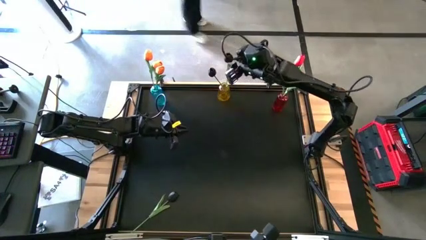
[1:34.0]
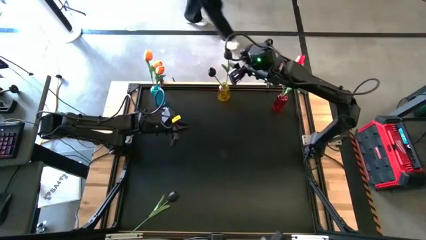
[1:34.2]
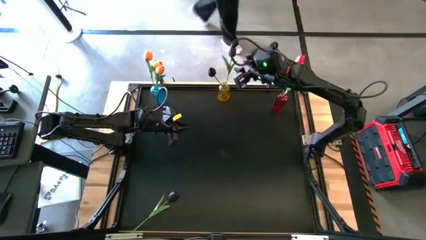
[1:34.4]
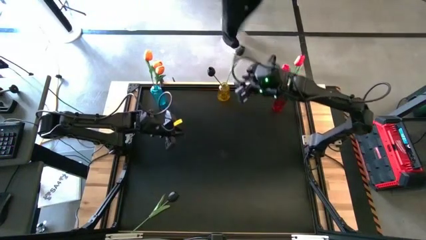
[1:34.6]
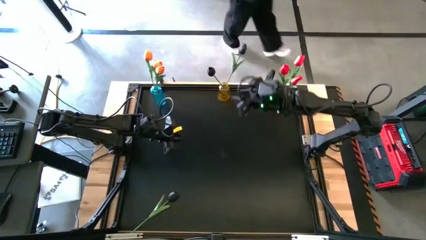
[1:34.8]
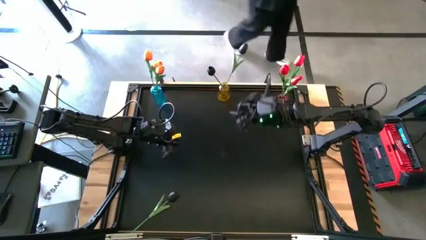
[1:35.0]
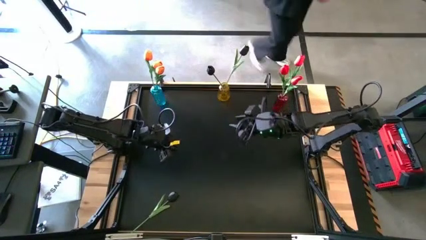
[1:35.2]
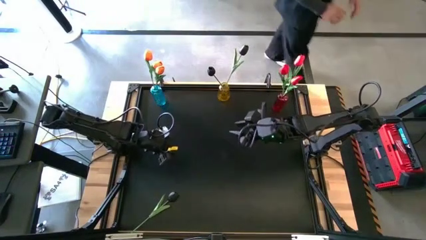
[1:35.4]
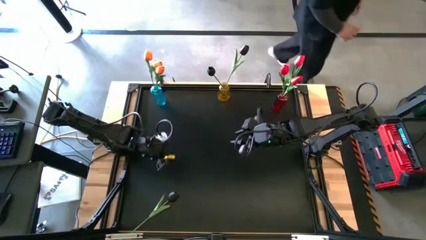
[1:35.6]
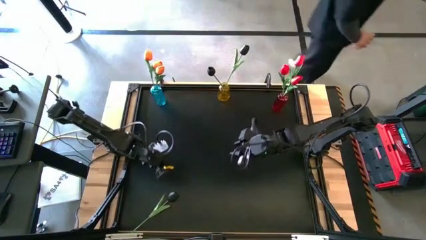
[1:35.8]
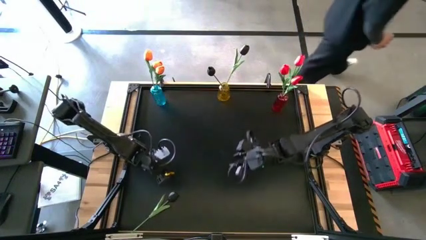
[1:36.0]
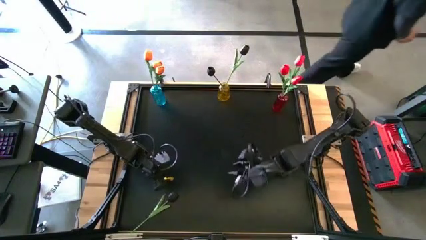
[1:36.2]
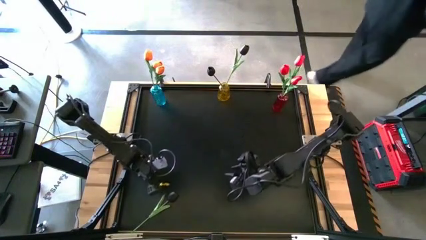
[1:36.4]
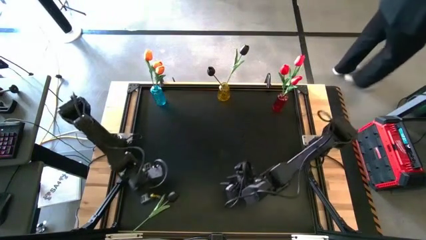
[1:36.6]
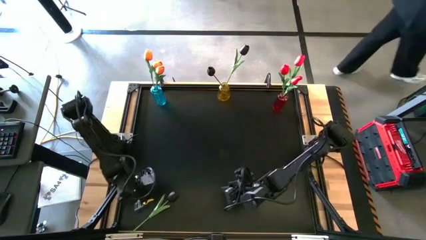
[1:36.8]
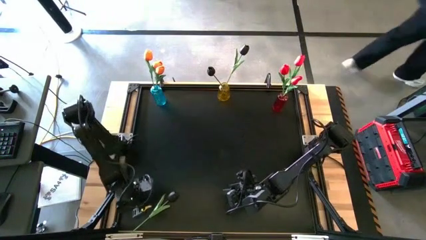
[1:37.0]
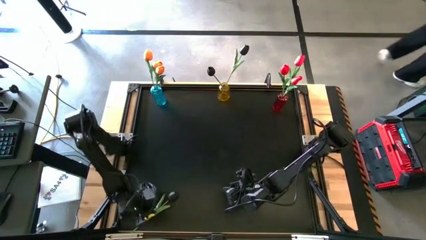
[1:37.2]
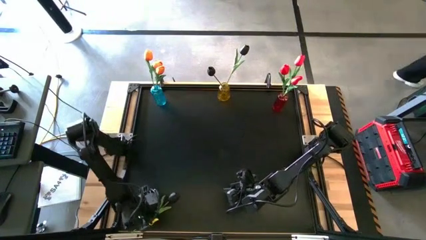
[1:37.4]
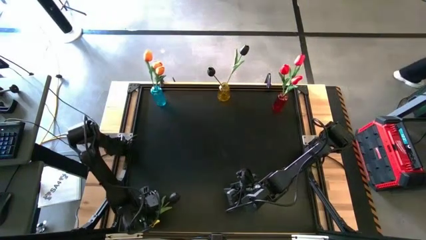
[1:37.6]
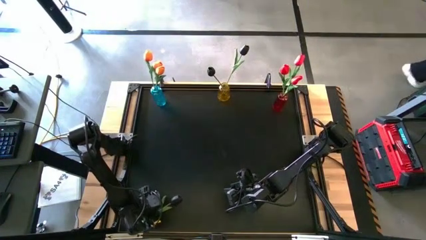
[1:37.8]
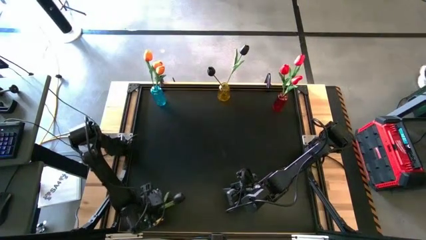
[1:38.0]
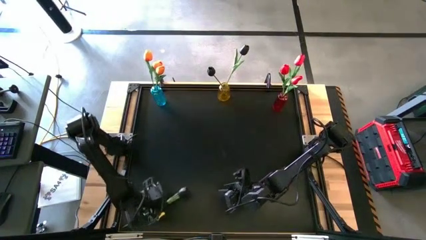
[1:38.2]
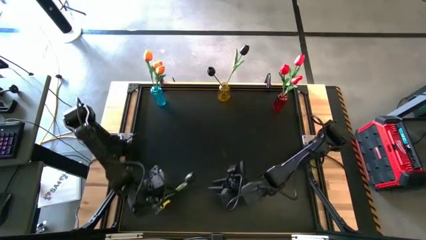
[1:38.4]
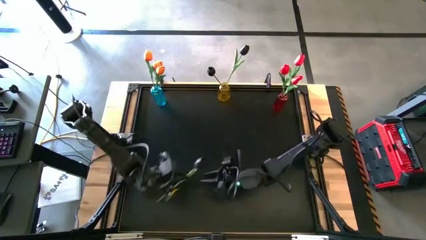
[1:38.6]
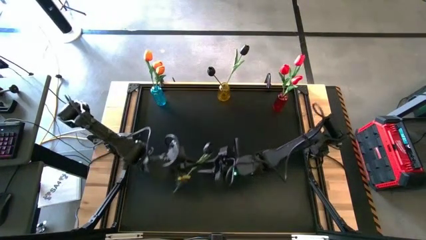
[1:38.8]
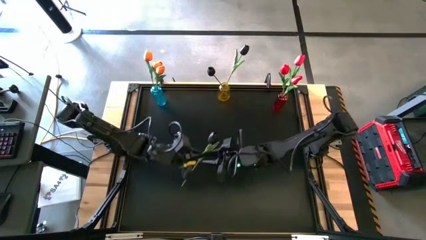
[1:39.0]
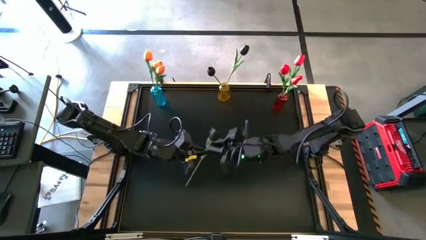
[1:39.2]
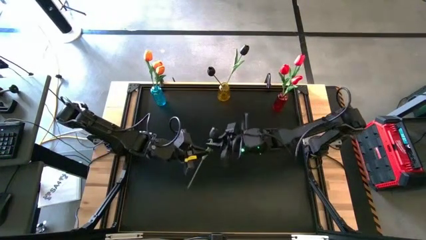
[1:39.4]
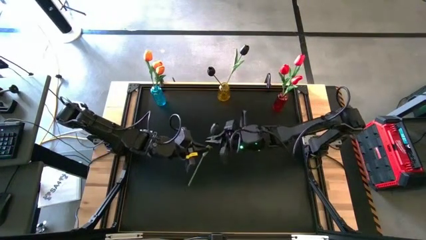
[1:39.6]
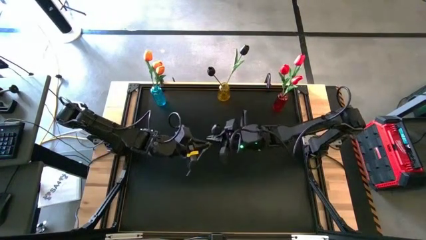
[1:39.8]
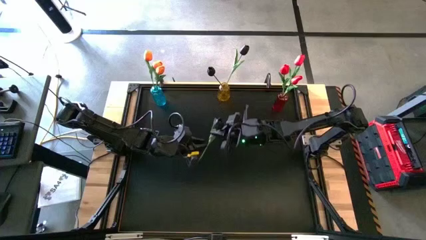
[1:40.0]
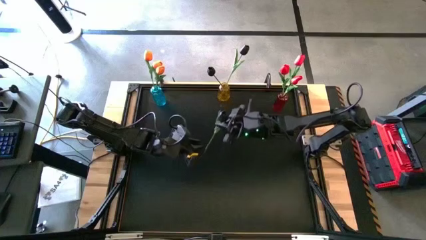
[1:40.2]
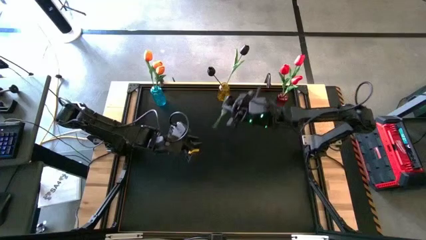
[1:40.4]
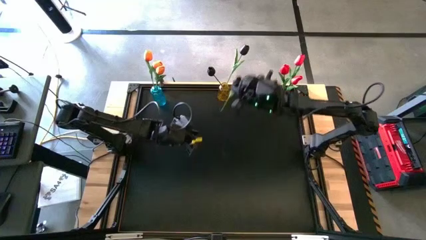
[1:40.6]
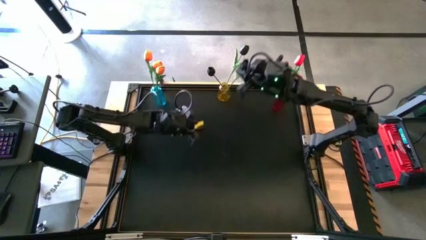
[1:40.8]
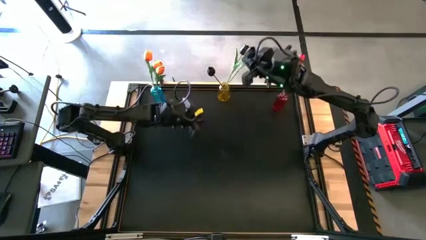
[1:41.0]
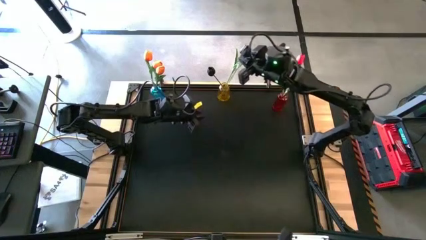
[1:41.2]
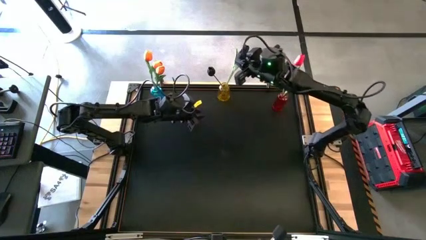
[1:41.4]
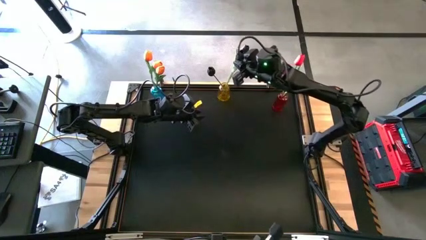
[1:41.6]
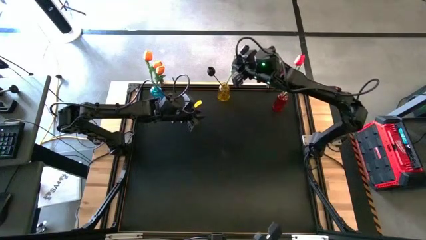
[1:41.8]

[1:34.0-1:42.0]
Task: Sort flowers into vase by color
Put the black flower into the yellow vase

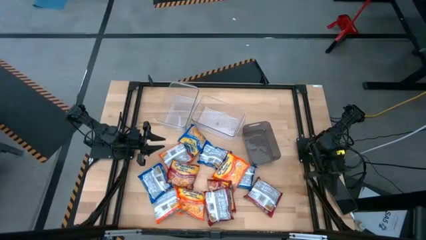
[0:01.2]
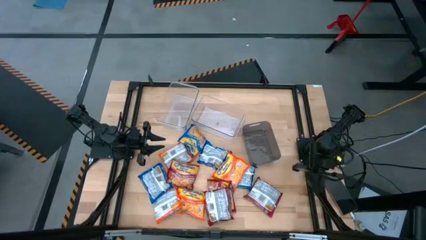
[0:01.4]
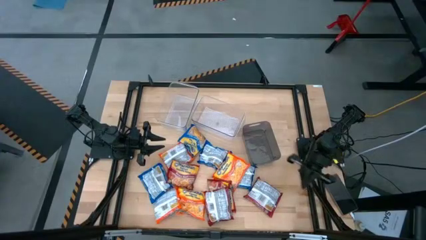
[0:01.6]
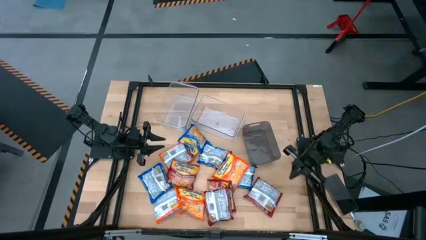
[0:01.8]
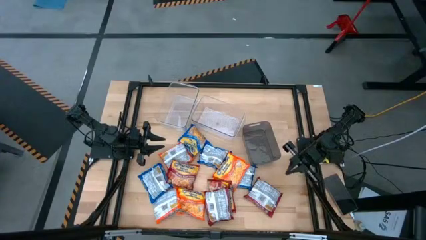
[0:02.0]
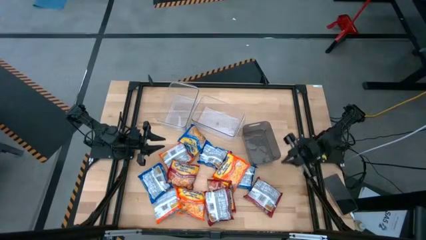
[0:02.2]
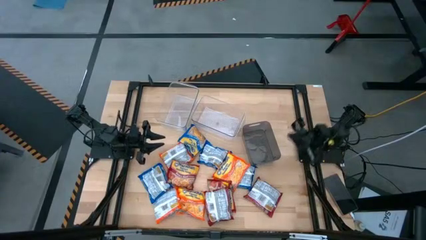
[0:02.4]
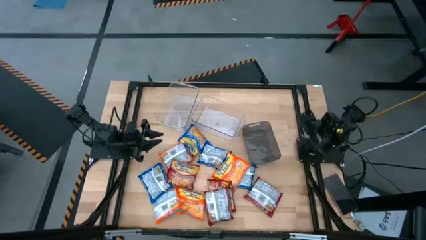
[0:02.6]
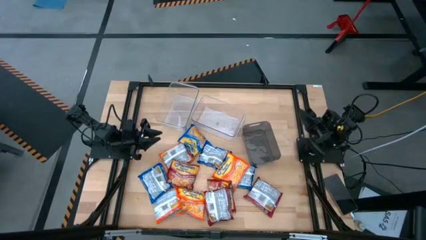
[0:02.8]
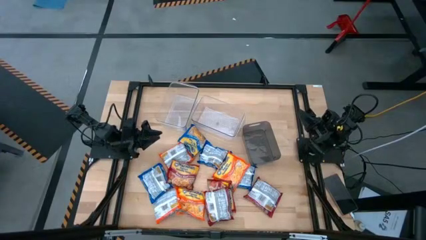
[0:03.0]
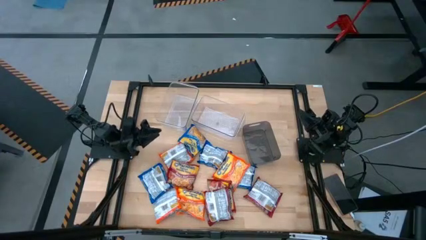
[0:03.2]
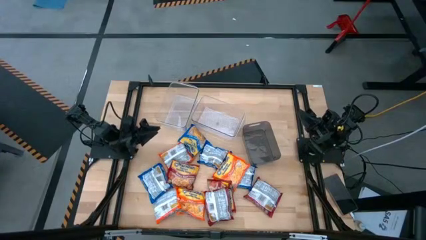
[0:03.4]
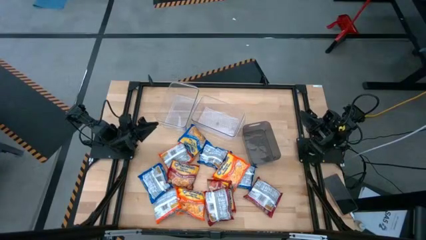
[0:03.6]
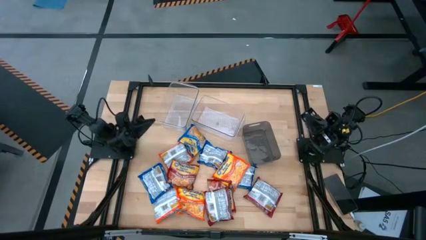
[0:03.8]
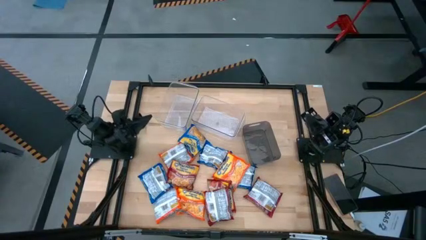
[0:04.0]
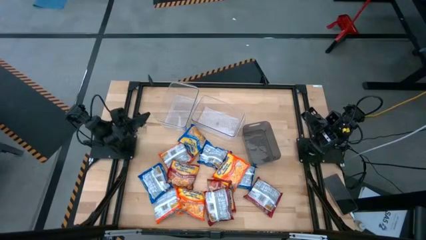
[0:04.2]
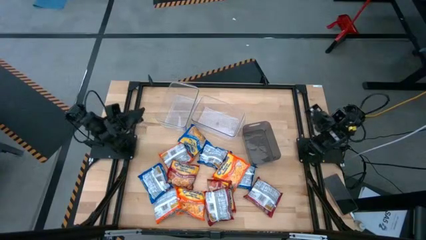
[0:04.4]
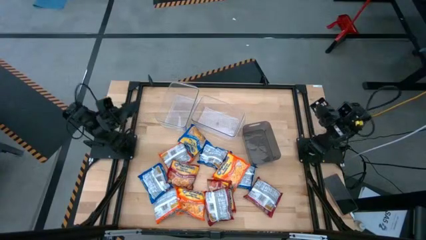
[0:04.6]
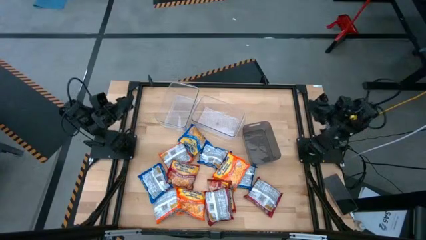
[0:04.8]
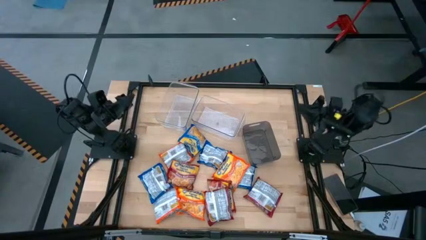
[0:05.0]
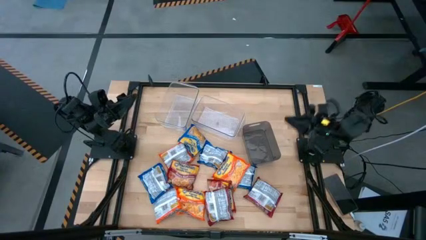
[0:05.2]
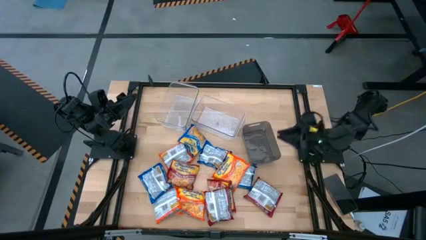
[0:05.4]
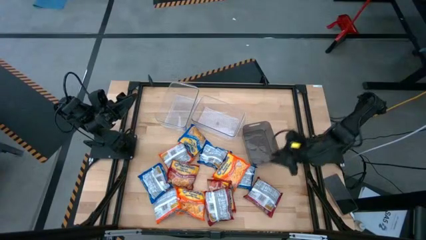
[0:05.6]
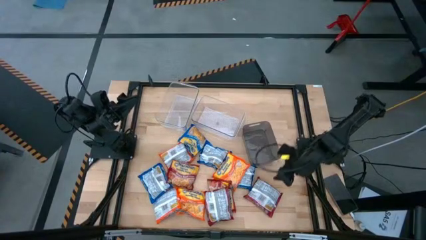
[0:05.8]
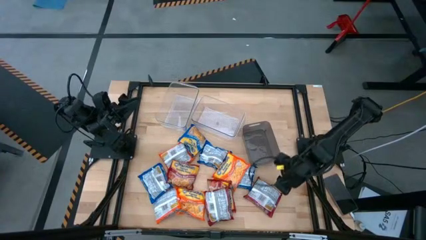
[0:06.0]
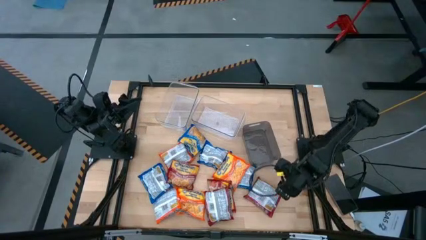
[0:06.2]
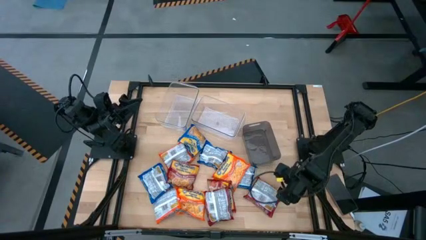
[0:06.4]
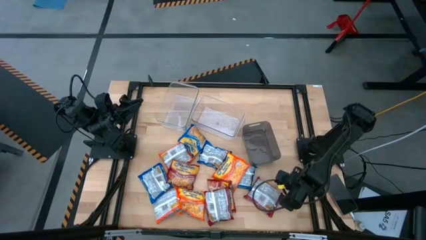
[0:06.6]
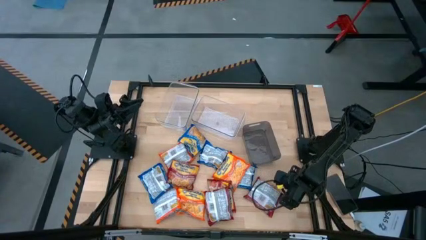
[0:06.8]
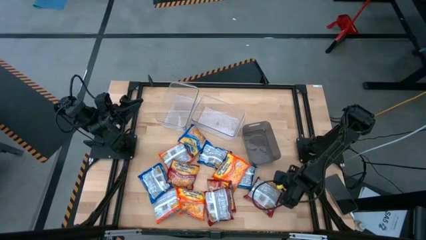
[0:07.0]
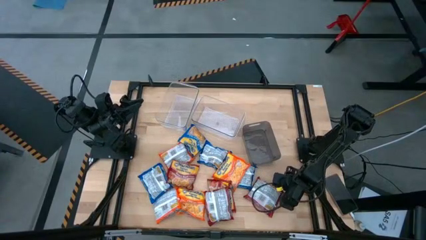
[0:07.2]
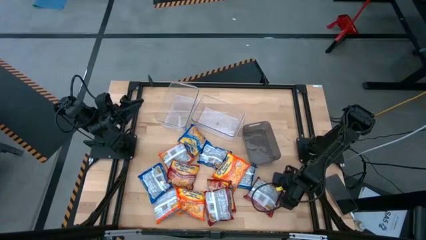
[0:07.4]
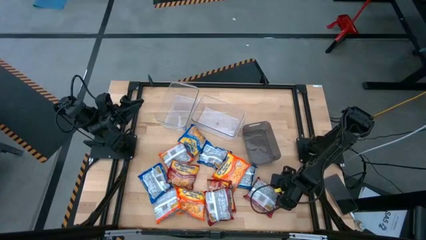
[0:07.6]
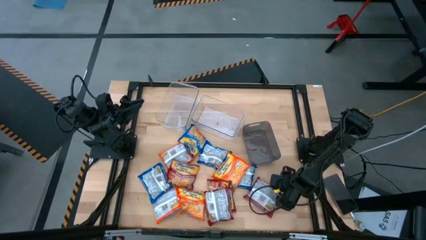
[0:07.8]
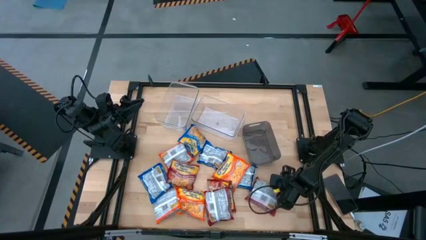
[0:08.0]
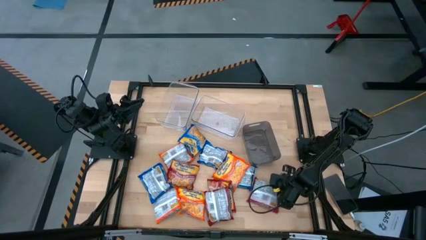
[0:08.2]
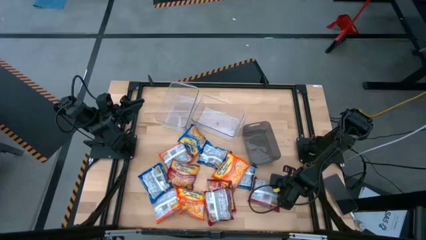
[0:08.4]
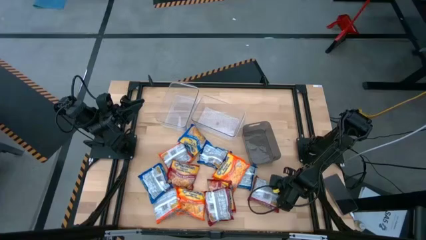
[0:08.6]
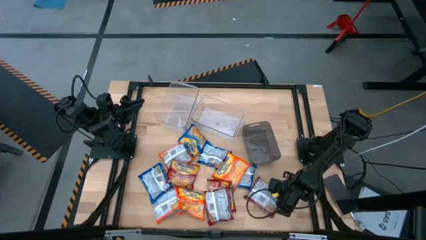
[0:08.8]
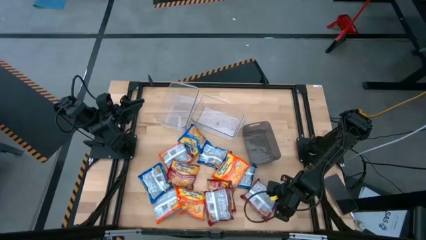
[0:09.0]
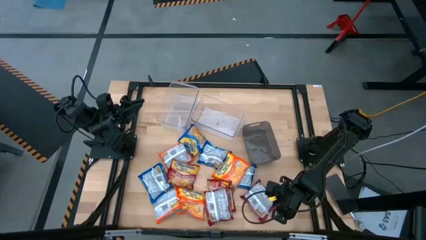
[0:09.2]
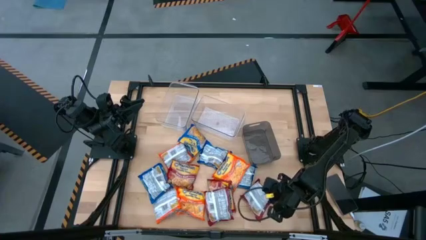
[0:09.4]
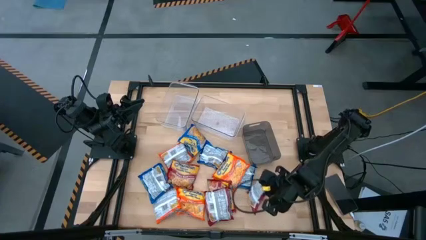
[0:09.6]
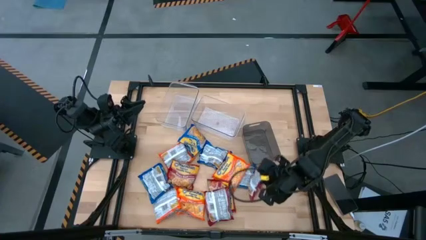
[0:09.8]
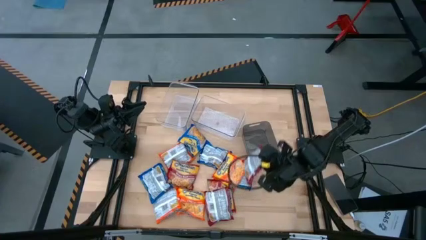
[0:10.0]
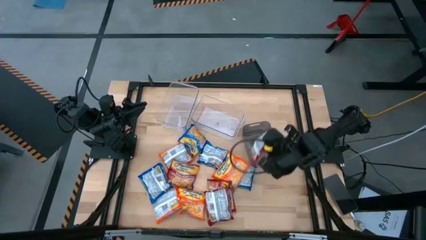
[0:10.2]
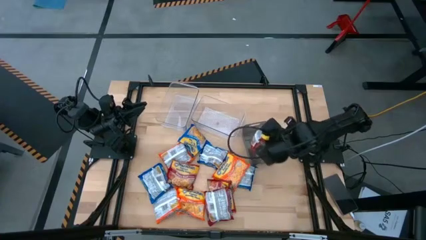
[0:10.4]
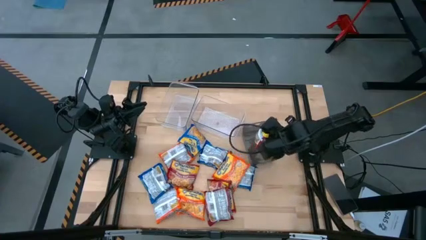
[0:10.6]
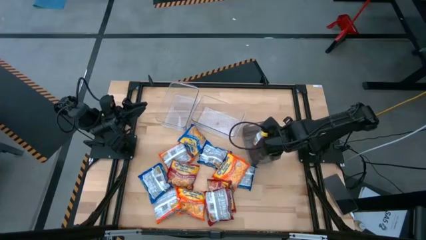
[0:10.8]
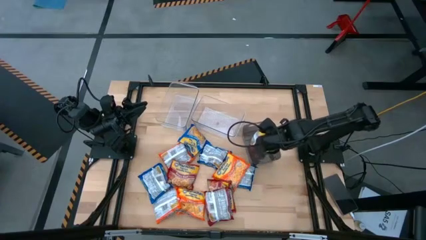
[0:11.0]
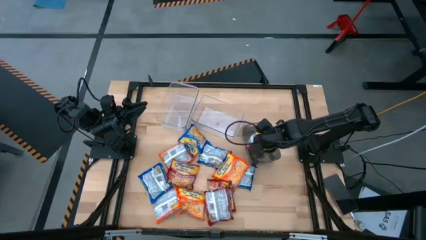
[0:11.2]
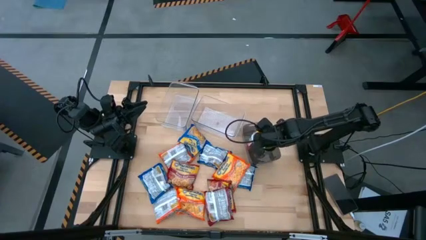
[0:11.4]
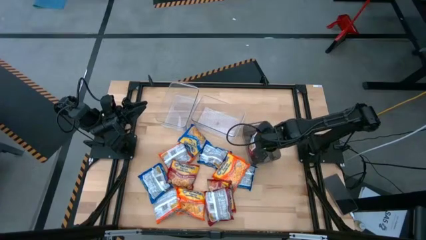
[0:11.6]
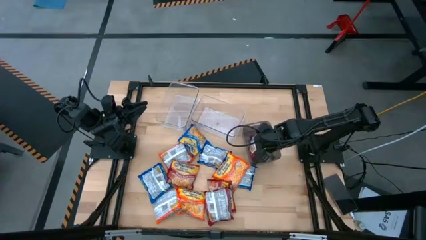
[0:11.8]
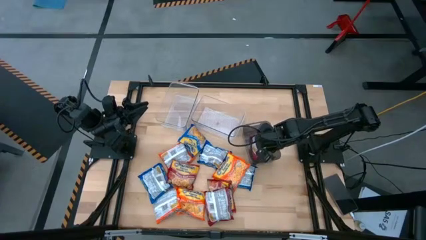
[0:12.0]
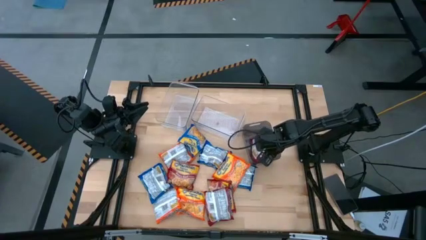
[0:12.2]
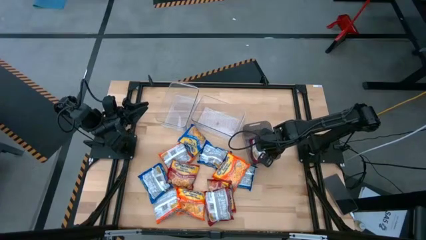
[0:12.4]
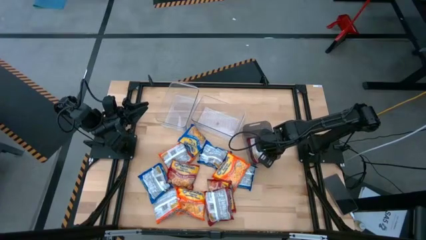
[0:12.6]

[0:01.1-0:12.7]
Task: Sort Maruchan noodles
Put the red noodle pack into the black bin
